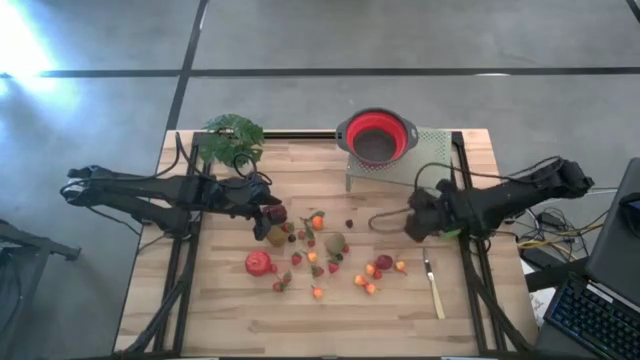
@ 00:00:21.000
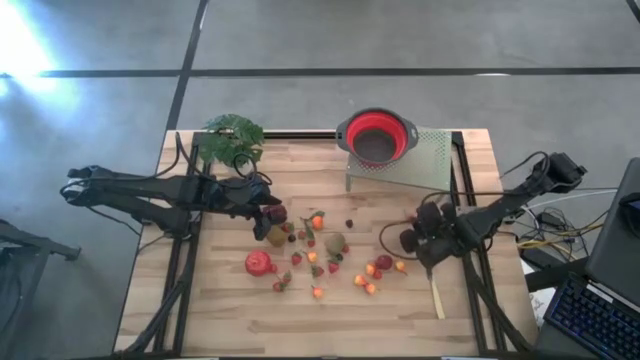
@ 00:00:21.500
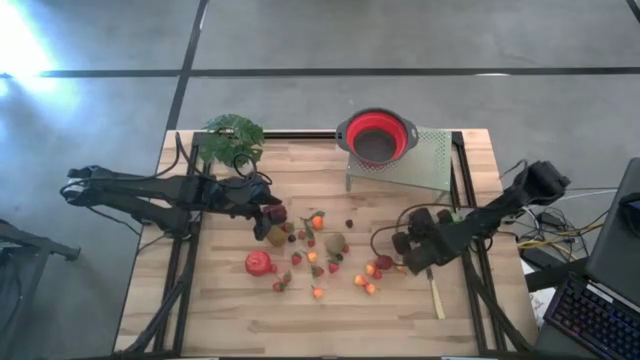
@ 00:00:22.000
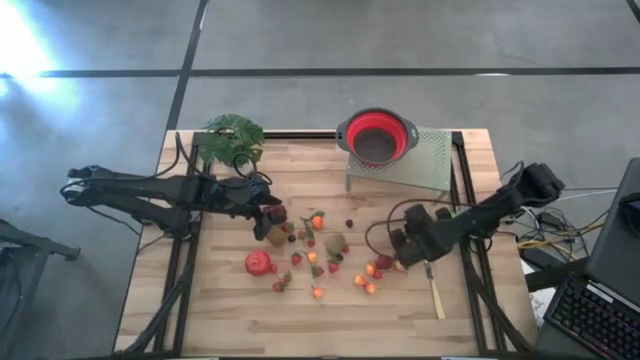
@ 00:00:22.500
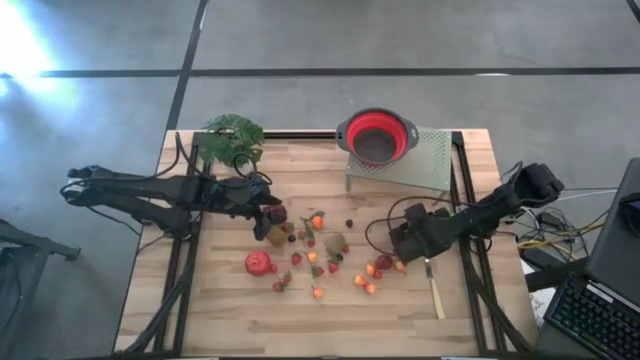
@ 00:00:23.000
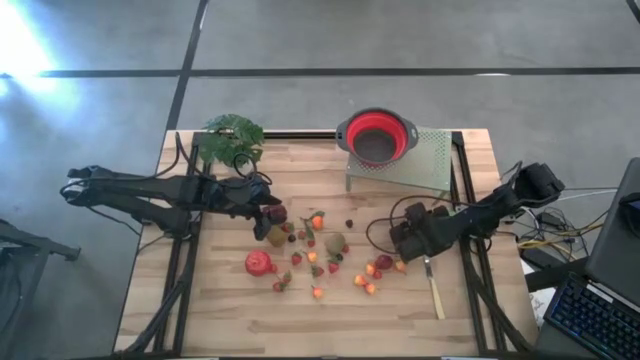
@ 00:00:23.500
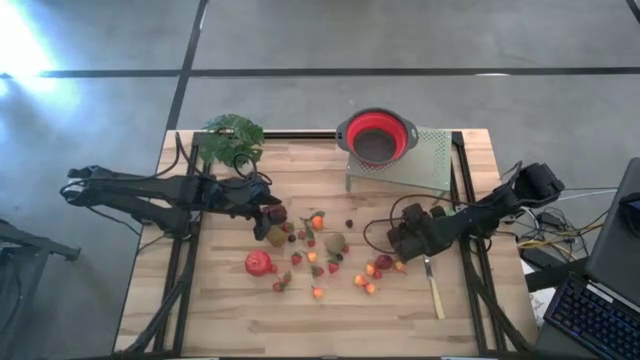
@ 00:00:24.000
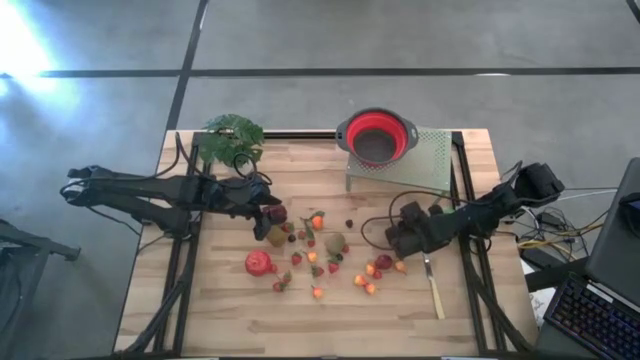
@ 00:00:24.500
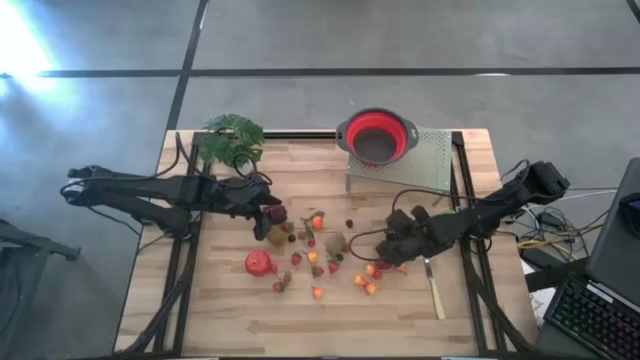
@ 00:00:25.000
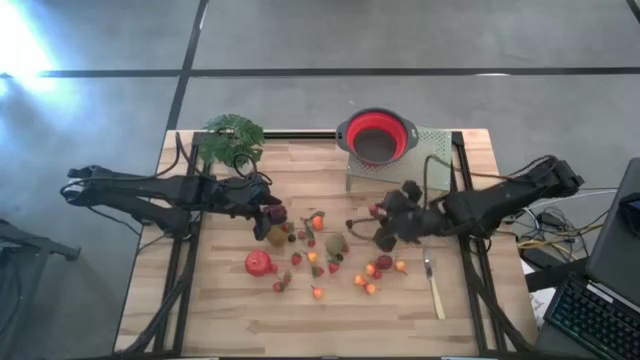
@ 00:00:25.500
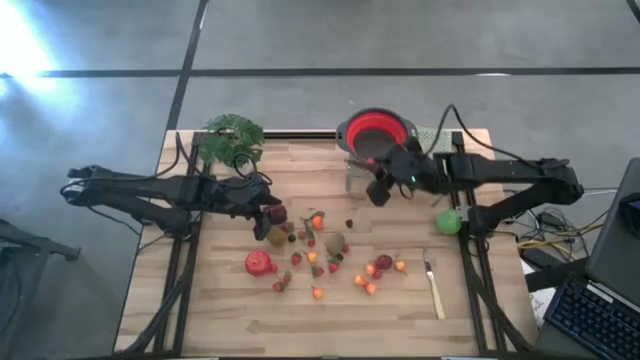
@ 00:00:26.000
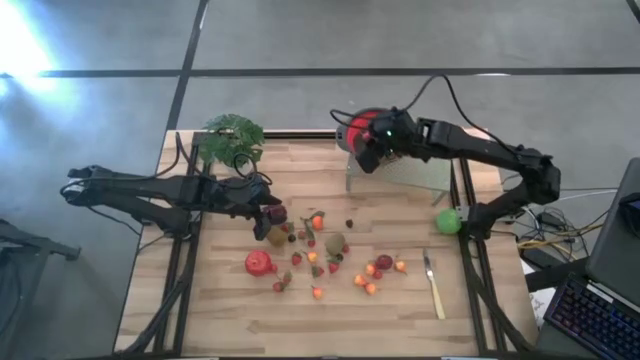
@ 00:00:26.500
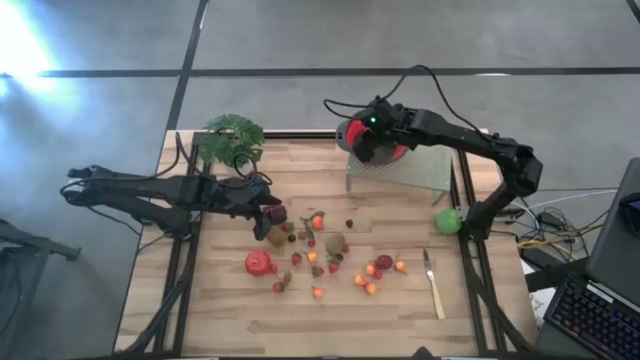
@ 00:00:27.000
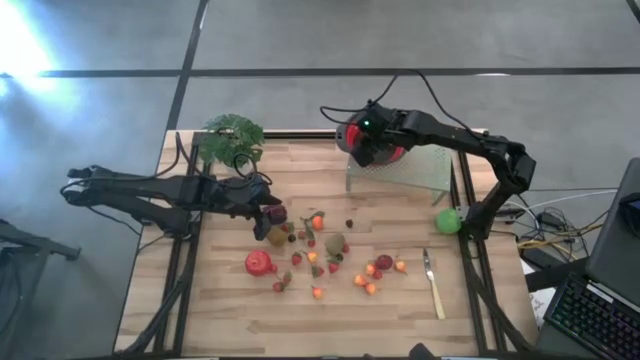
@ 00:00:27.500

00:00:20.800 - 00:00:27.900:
Task: Pick & Place Fruit
Put the red cherry into strainer bowl on the shelf

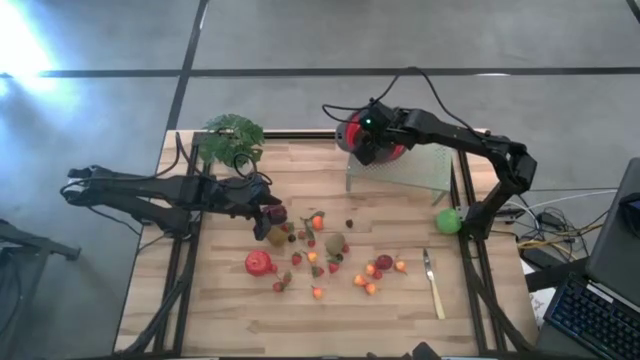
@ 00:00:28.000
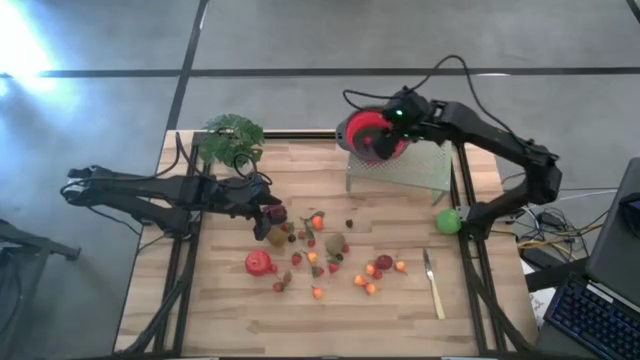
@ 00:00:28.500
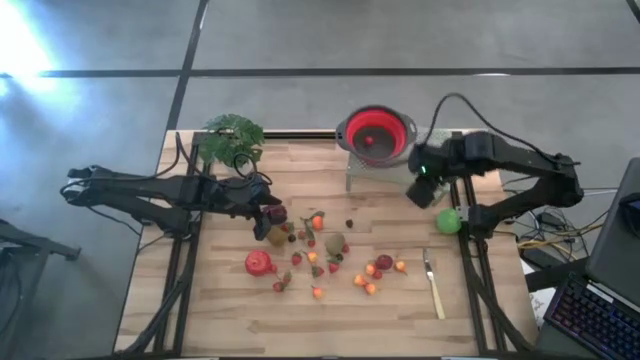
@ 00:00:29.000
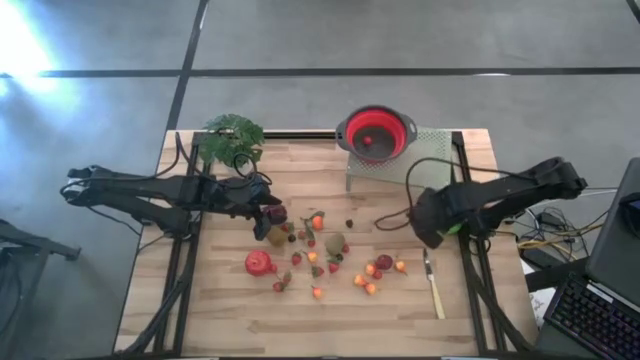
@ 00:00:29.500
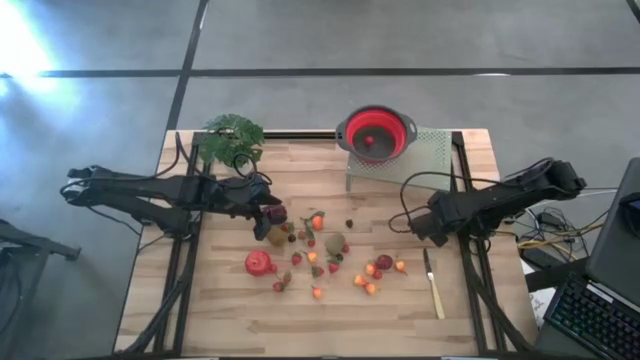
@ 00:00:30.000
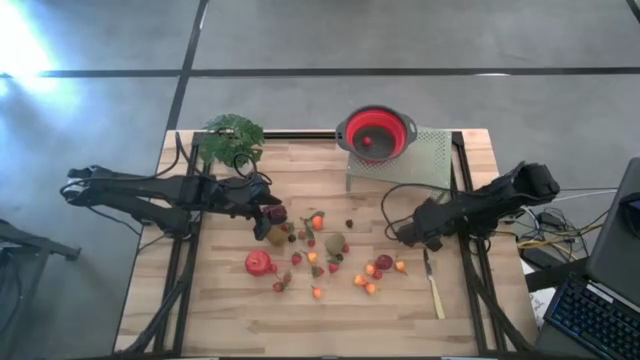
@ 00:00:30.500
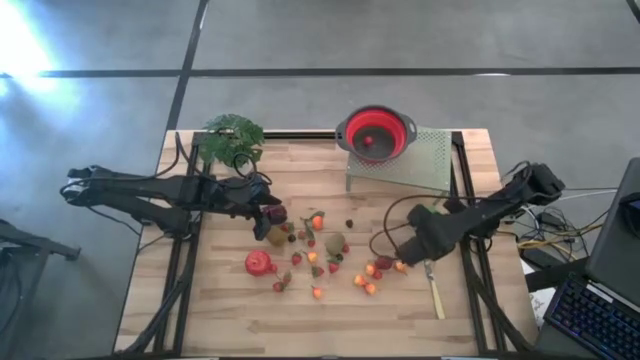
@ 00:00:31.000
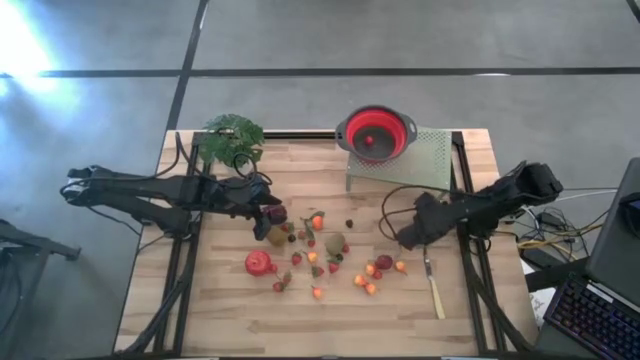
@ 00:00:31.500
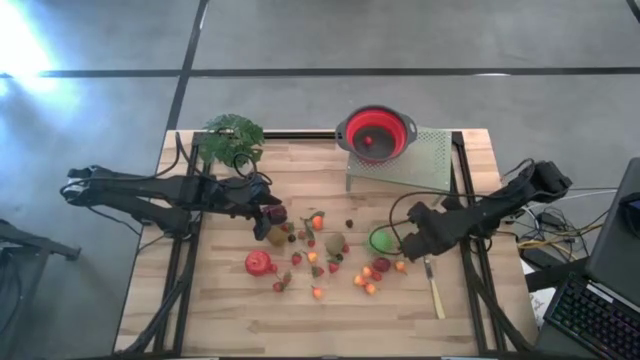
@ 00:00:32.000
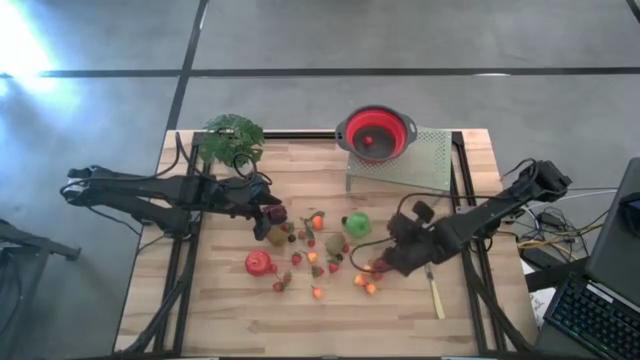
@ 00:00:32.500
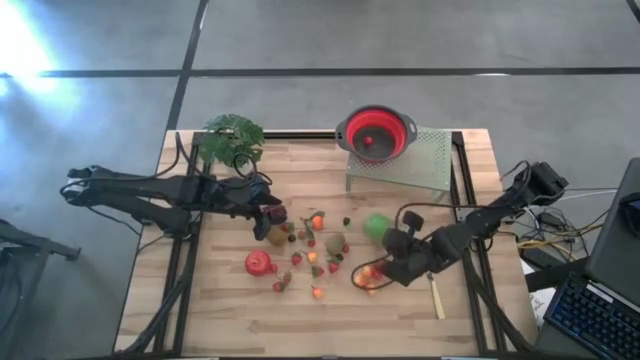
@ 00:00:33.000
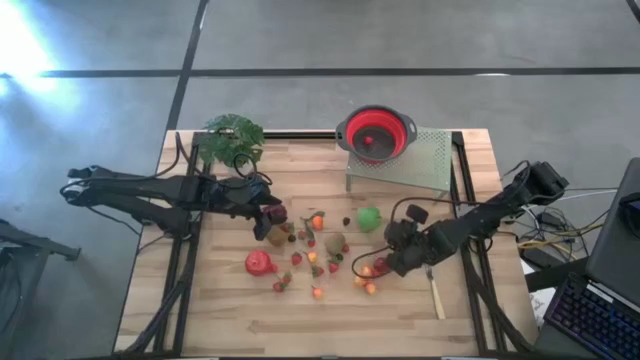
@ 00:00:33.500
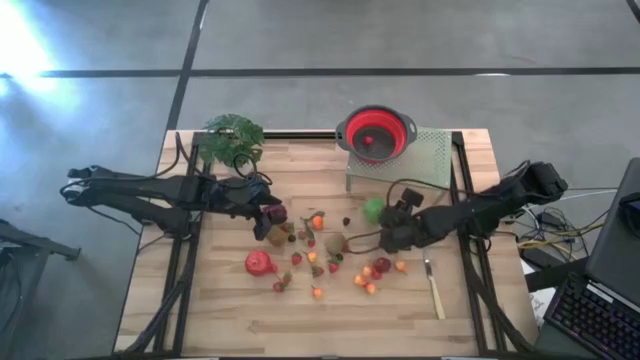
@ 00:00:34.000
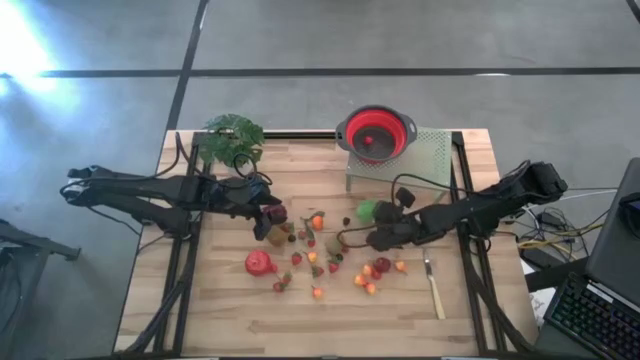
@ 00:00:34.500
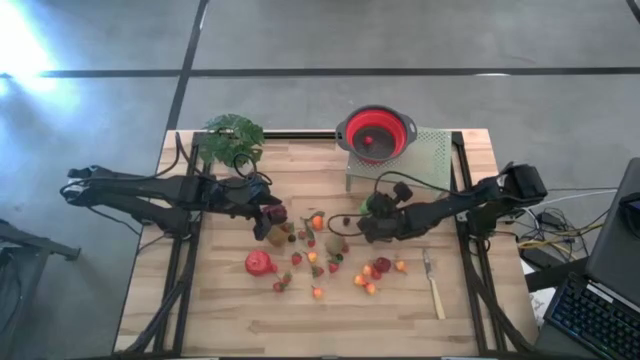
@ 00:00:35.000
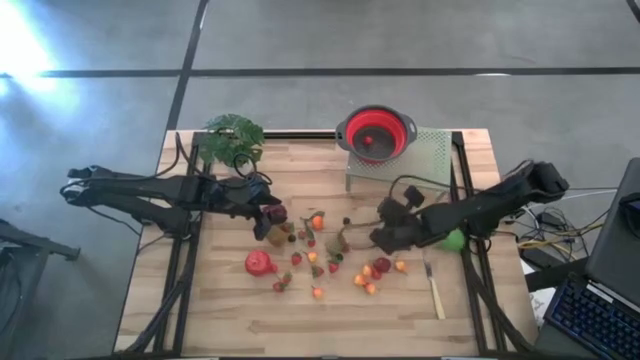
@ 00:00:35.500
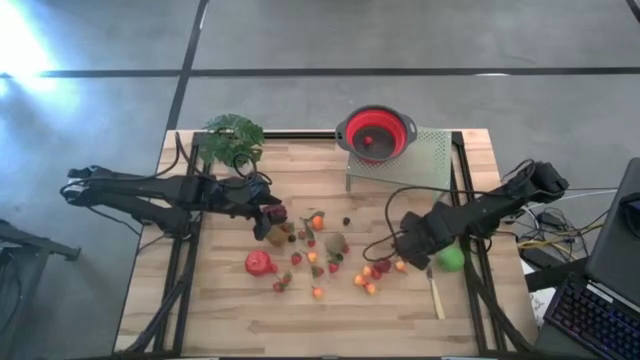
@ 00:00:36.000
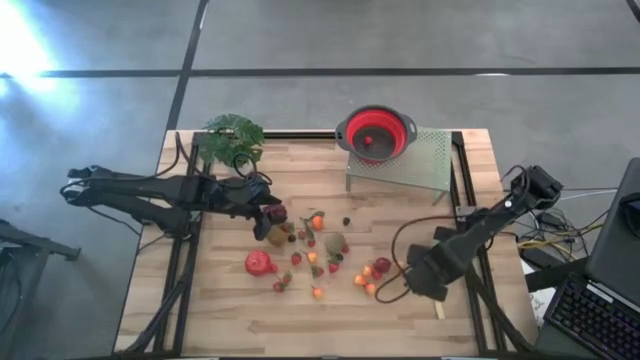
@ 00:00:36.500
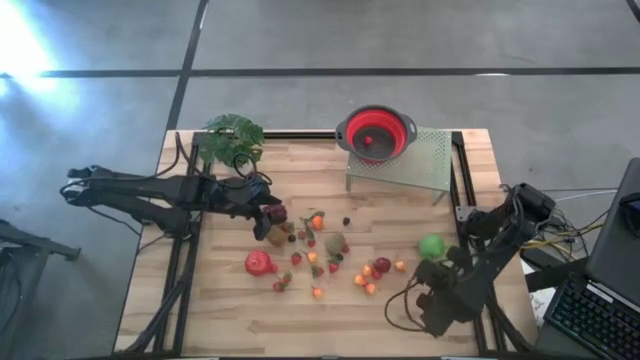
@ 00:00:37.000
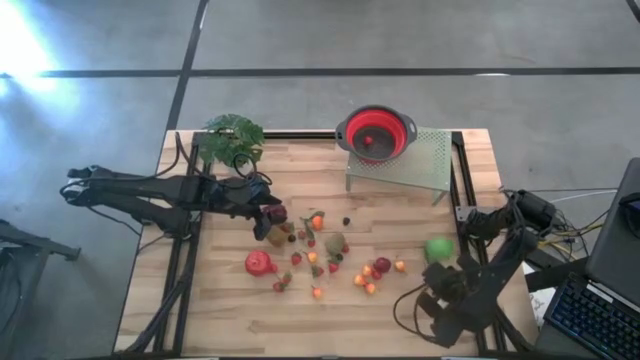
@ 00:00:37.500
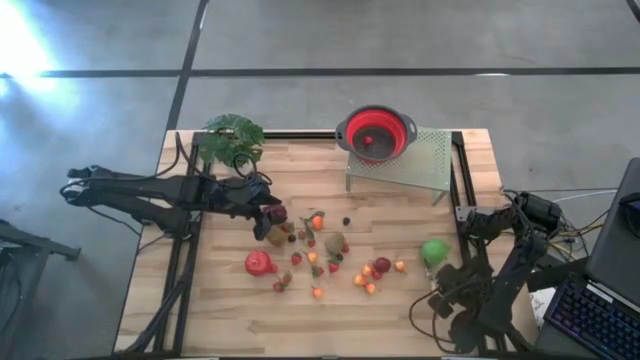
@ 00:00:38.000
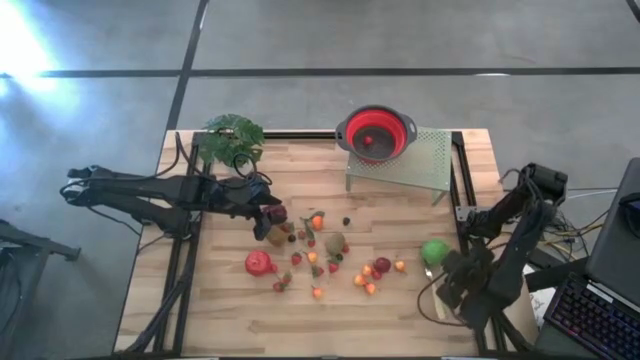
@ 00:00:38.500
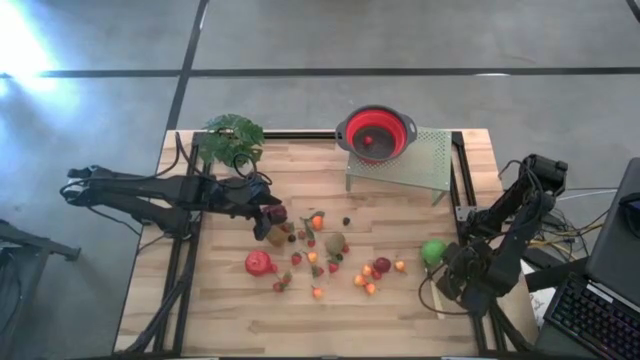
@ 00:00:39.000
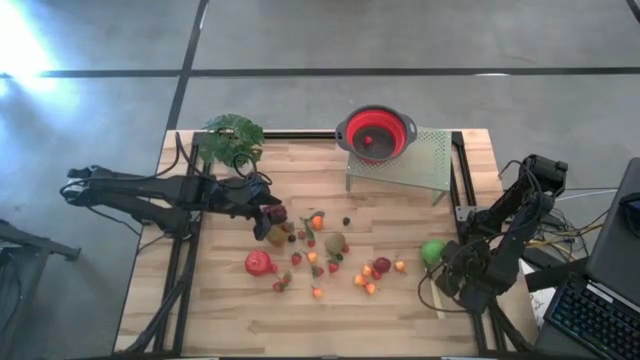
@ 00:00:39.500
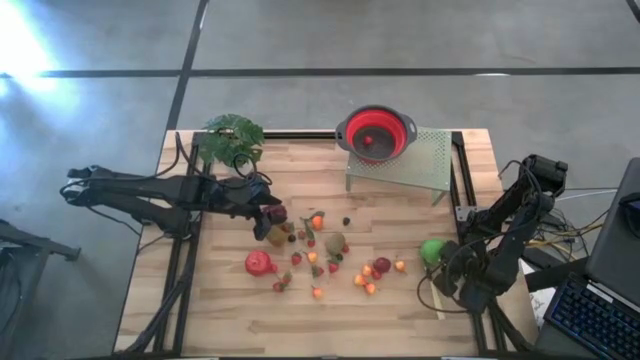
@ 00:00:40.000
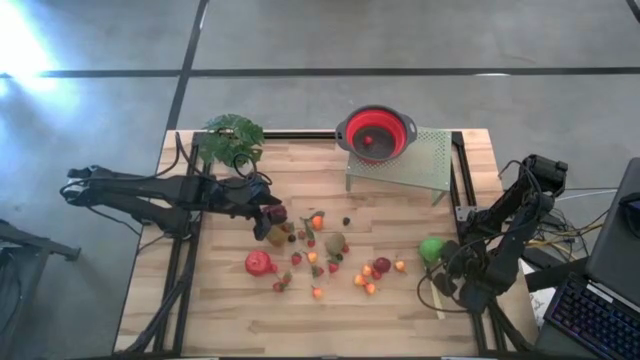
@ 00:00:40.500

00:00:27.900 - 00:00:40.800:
Put the green apple into the strainer bowl on the shelf
